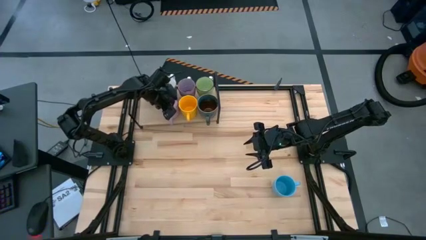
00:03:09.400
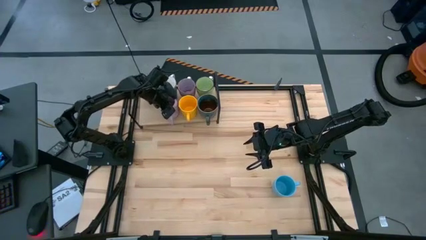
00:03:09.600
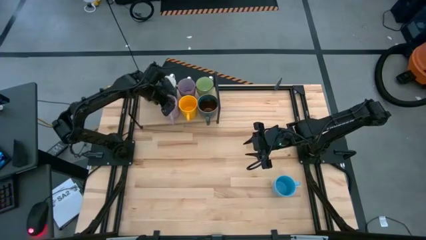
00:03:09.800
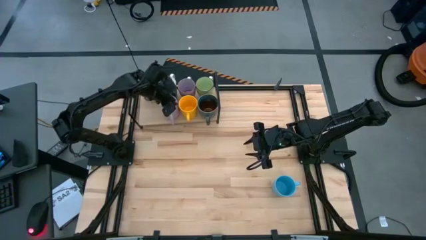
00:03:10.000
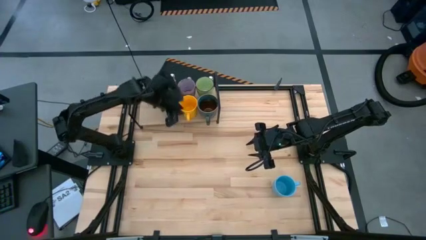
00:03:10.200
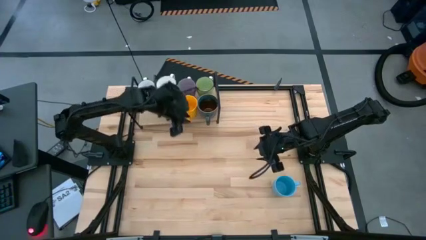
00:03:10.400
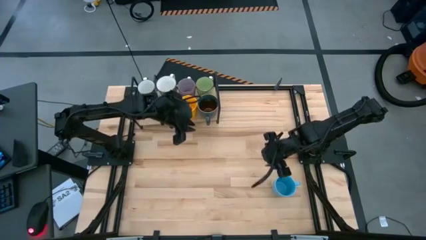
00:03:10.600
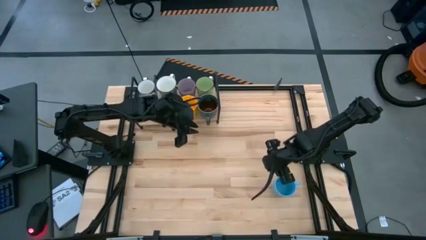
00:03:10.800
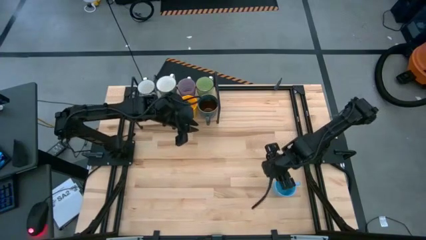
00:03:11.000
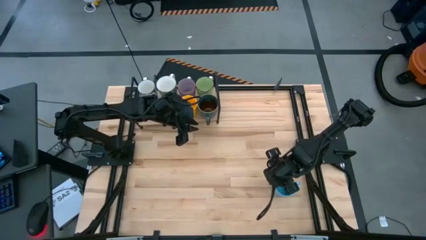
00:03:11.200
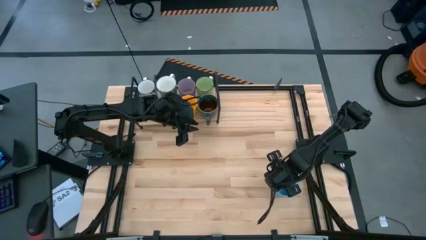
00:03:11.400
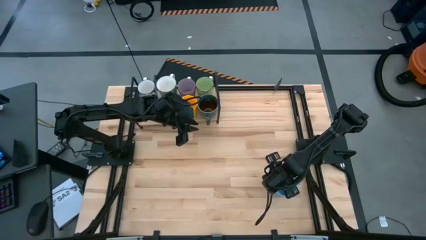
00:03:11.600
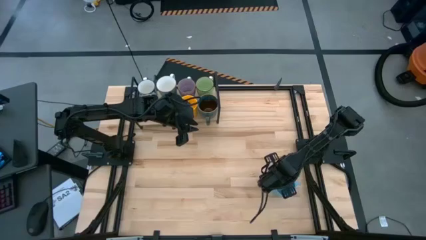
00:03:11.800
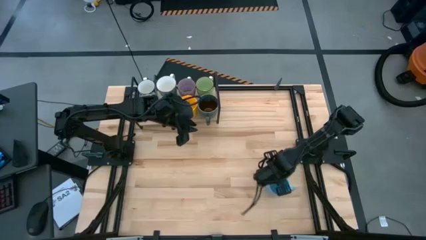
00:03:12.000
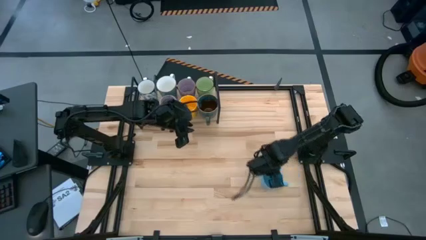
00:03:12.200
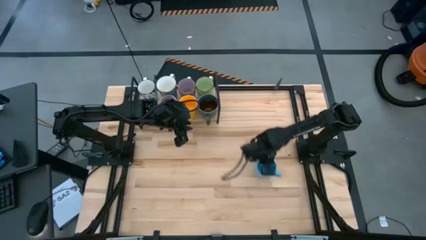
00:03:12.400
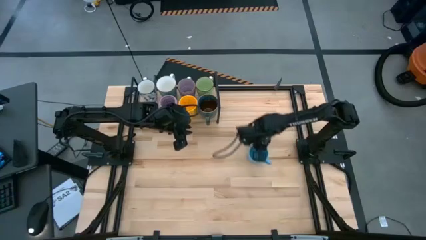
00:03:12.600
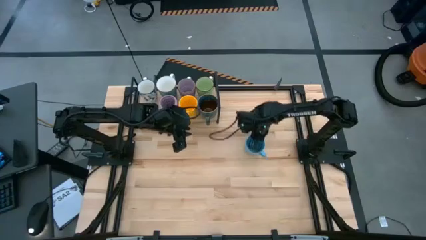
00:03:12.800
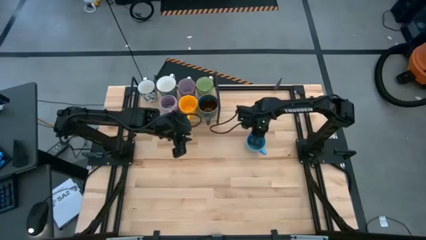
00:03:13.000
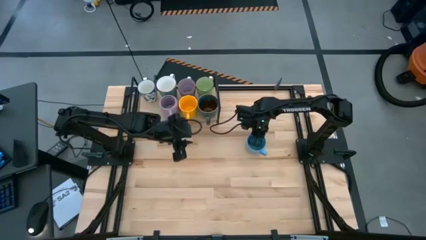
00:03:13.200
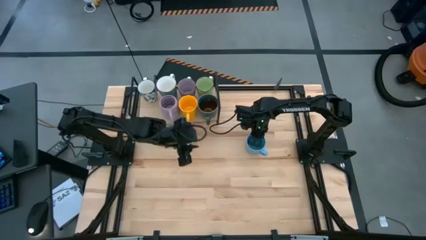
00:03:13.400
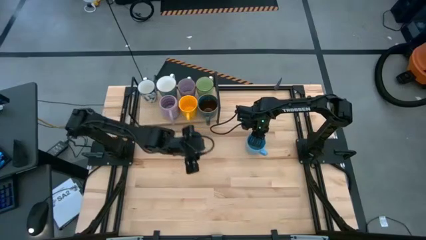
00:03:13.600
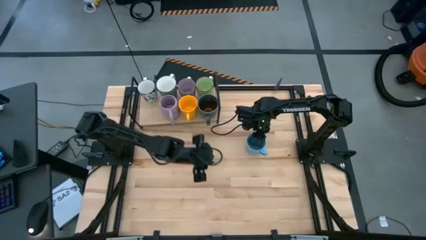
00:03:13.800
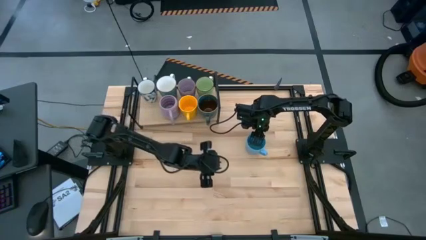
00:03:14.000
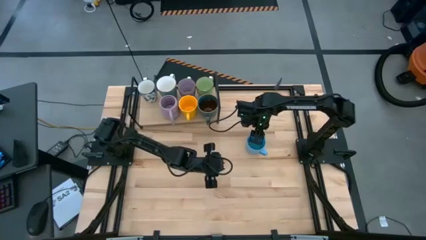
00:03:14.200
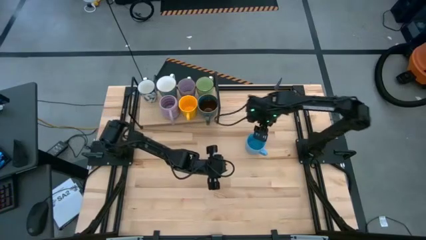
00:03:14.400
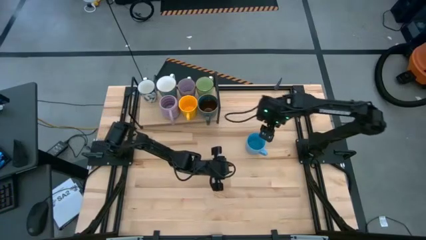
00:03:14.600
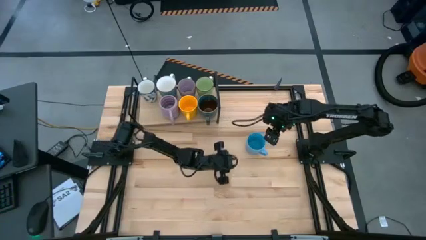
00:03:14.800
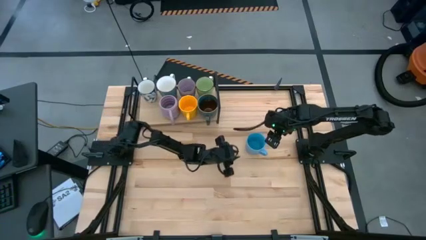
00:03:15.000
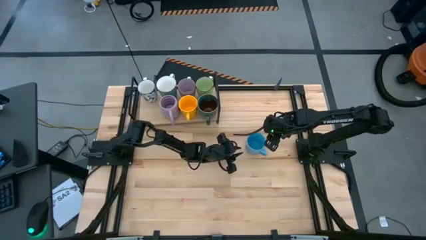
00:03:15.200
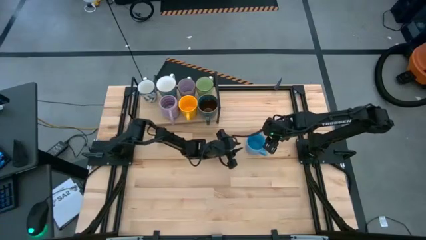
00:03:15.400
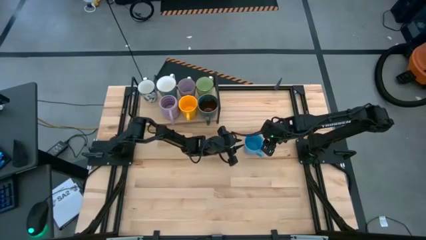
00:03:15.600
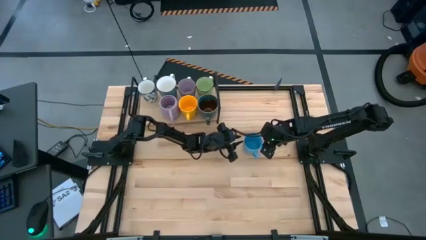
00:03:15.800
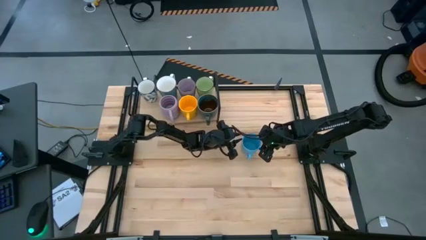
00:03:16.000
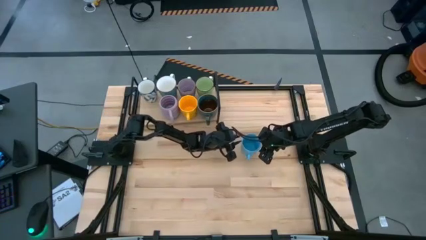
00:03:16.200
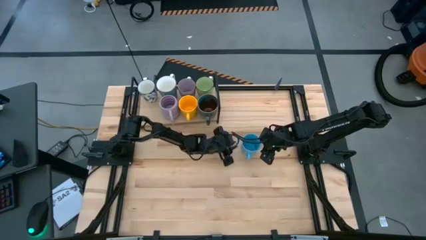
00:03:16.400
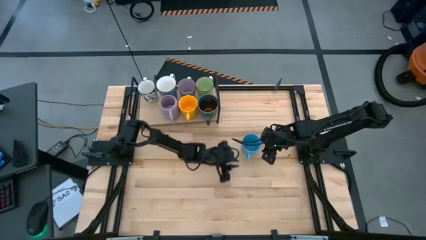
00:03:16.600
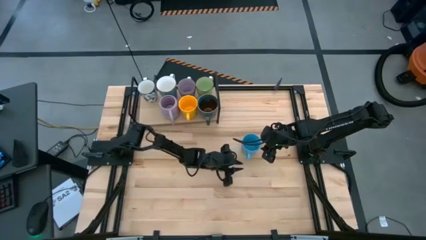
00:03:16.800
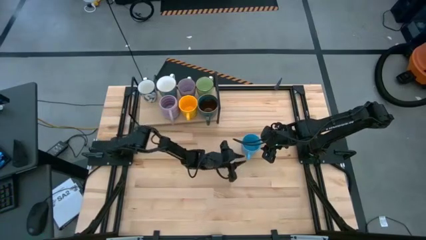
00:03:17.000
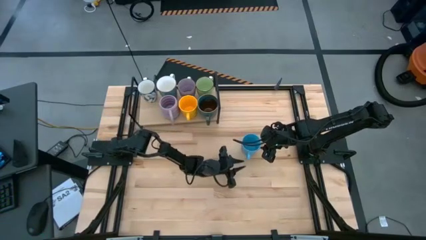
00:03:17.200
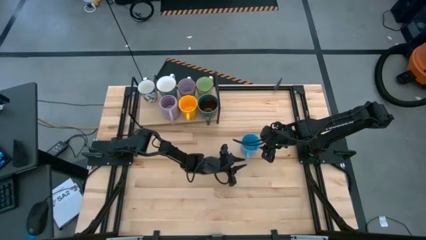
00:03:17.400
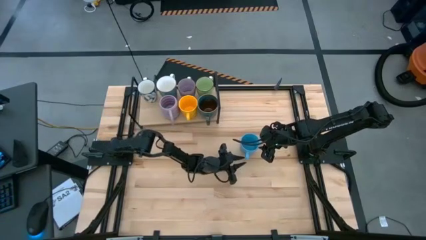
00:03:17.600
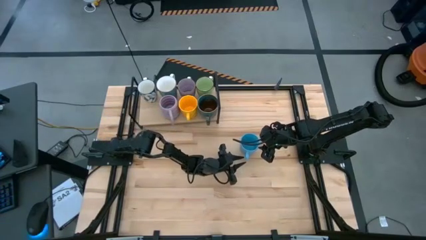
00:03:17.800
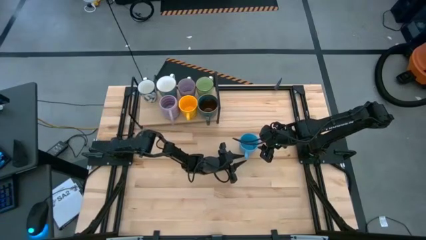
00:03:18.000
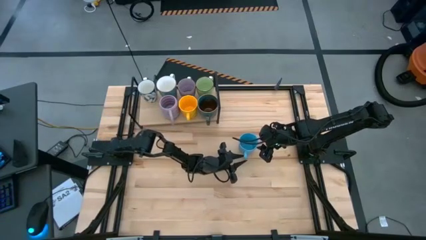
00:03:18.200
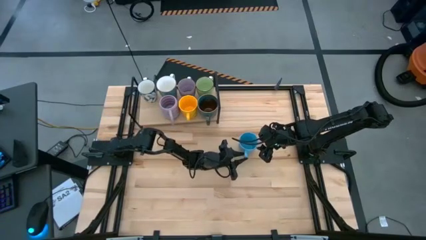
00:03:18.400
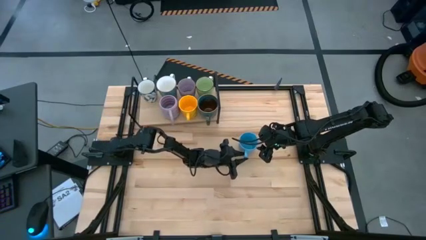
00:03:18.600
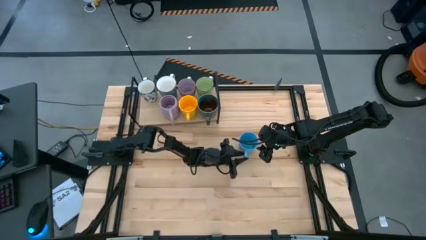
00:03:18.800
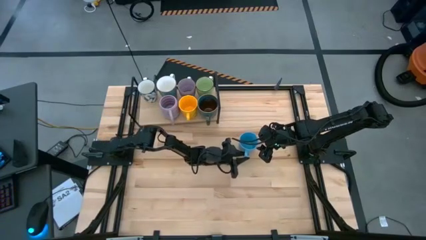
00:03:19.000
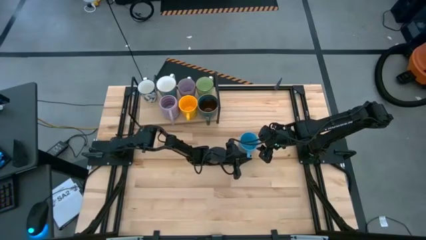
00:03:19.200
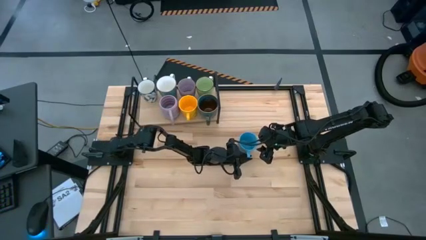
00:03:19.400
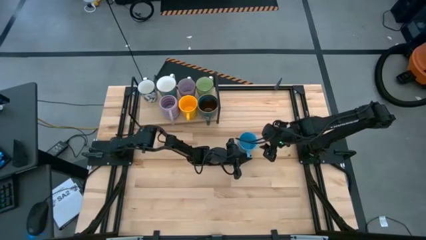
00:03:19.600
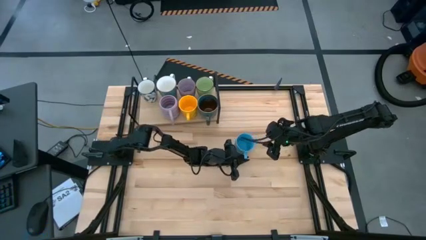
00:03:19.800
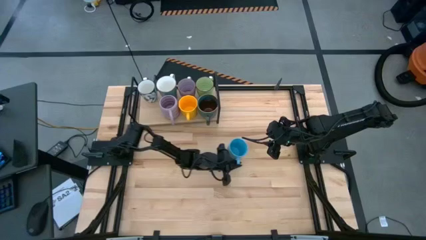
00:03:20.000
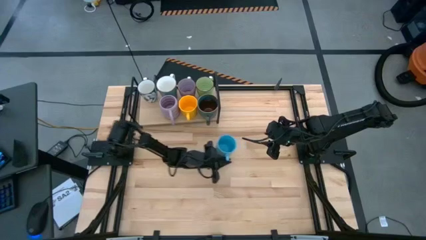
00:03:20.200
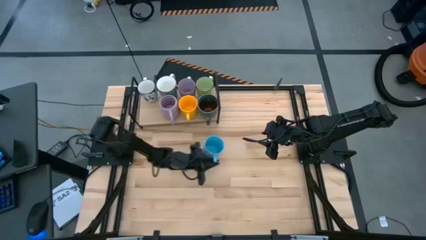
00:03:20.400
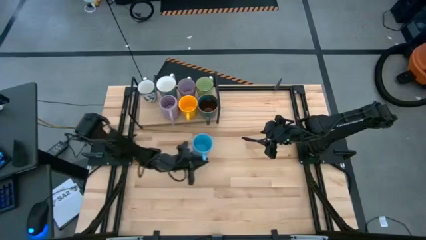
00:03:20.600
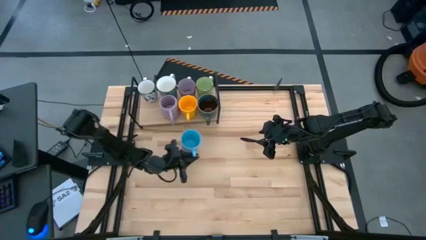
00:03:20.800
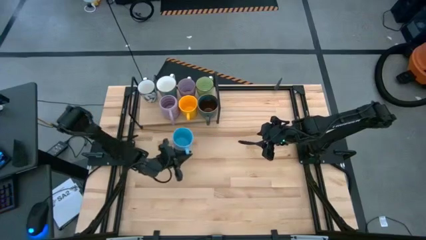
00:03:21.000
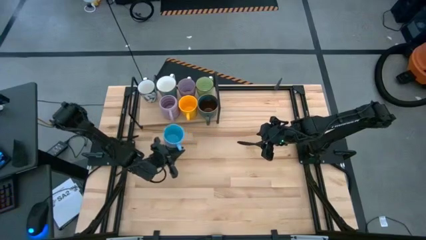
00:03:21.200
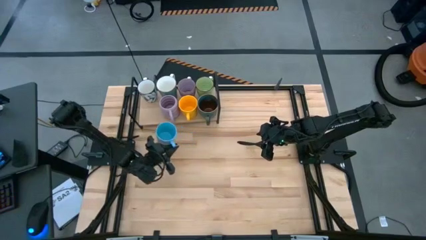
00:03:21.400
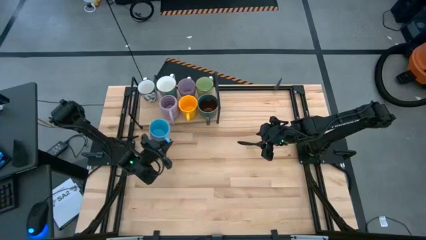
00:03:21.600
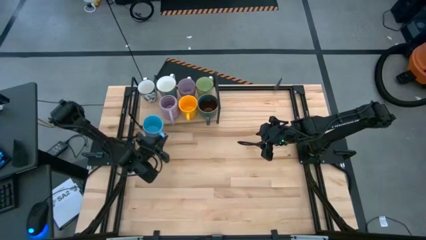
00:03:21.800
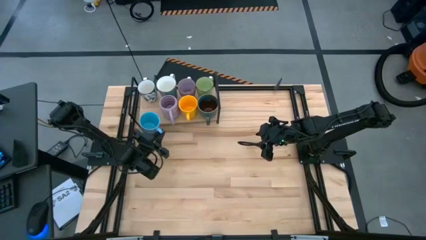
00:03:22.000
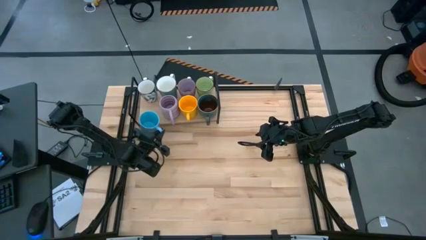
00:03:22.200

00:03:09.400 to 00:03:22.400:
Task: Place coffee mugs
Put the blue mug on the shelf

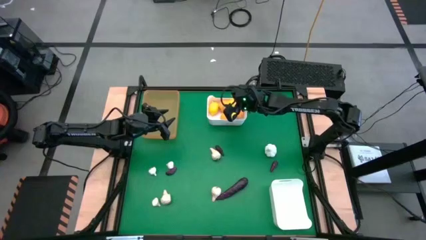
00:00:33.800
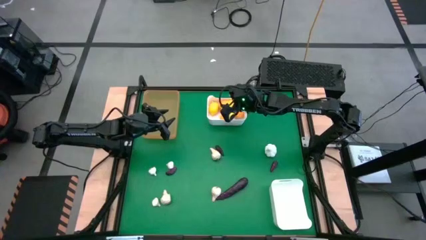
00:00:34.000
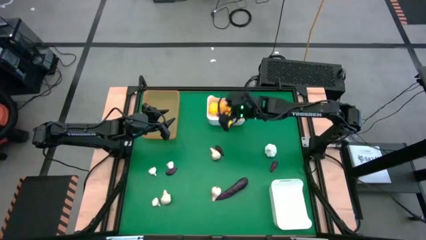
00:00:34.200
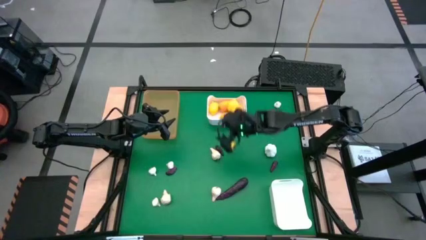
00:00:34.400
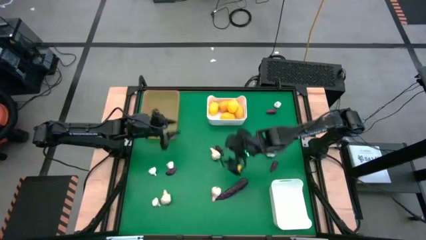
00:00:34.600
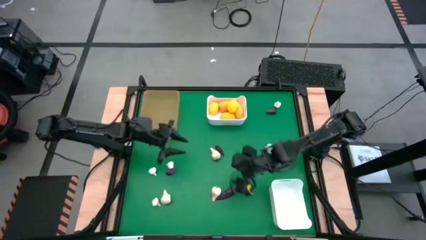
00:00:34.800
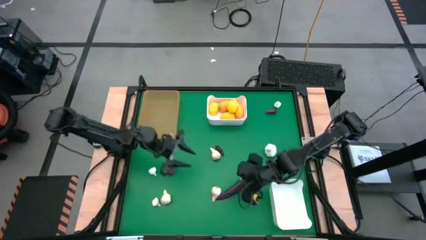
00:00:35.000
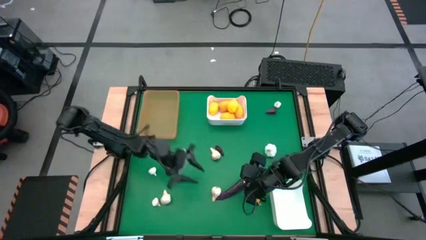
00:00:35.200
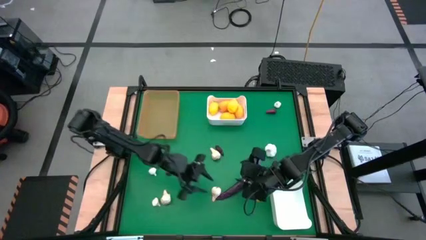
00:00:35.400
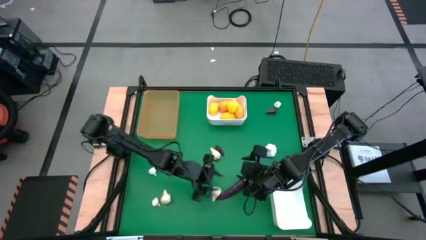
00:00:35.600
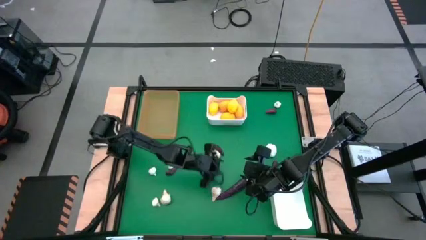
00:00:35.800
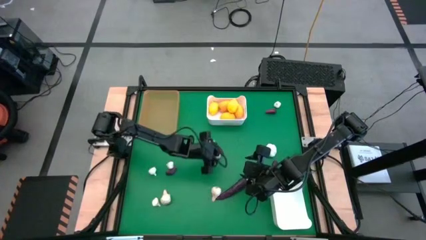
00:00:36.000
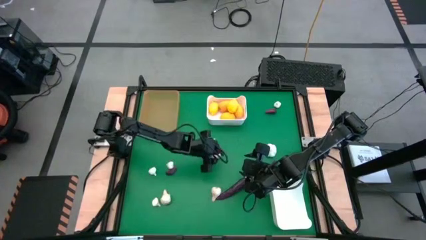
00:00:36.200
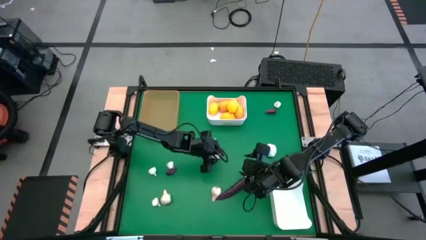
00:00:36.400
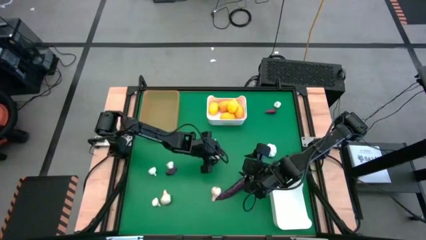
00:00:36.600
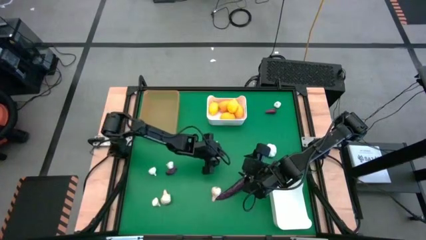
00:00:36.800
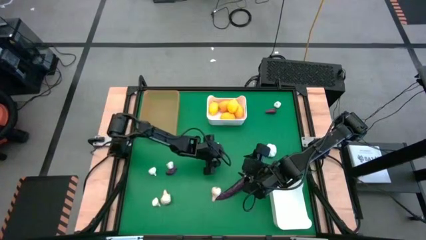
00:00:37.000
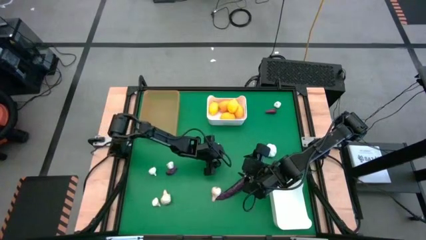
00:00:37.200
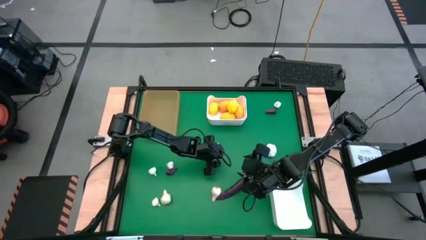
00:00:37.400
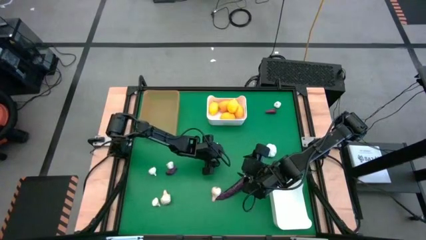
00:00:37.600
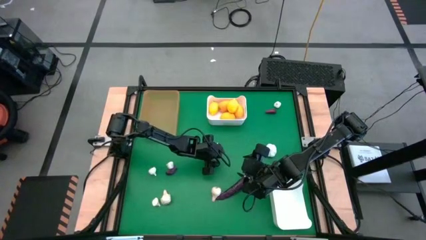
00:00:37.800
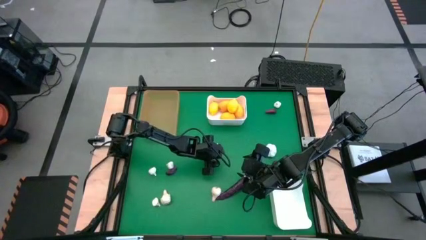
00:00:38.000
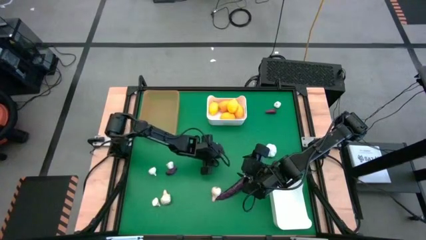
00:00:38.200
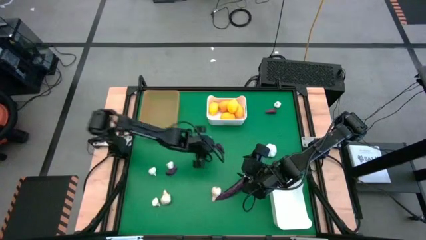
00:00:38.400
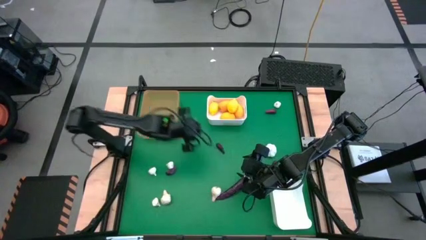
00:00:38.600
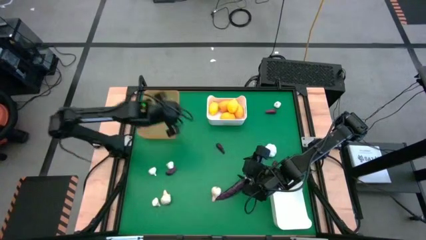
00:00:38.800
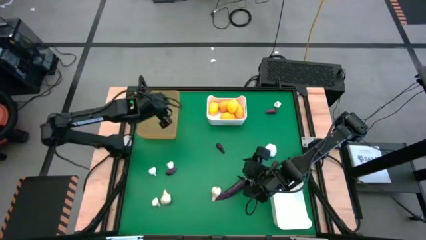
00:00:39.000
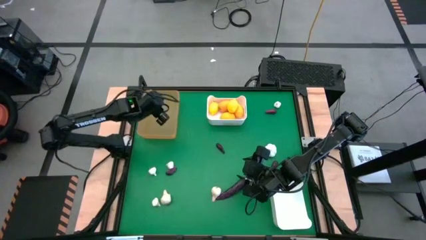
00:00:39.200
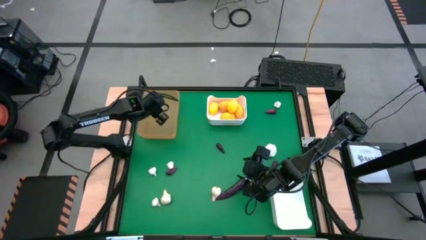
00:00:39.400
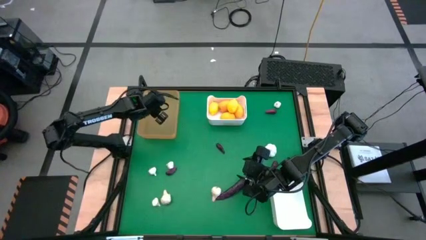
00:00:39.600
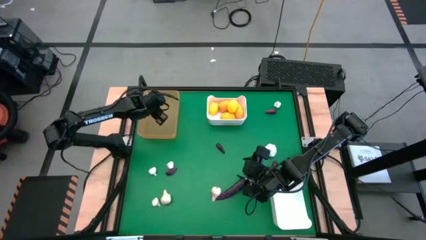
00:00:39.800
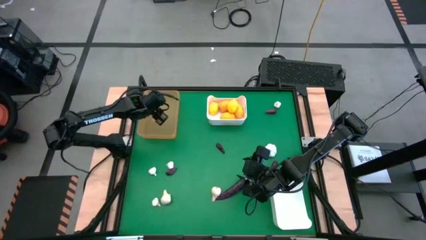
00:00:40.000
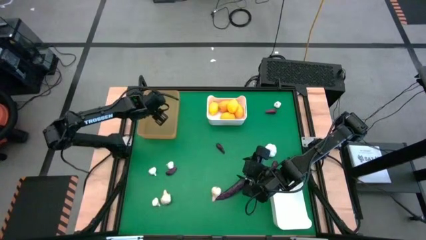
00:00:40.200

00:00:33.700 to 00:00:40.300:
Task: Sort produce into baskets
Put the garlic into the orange bin
